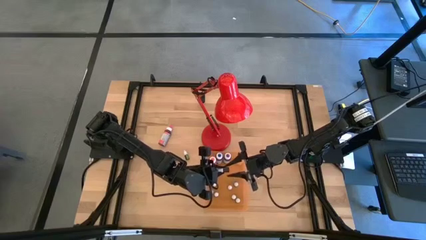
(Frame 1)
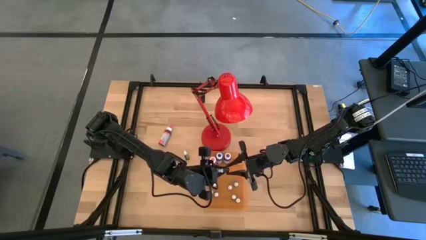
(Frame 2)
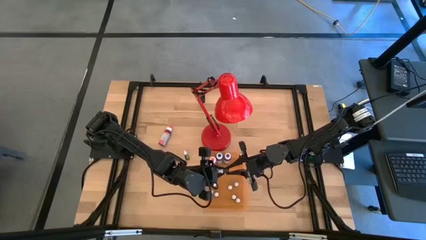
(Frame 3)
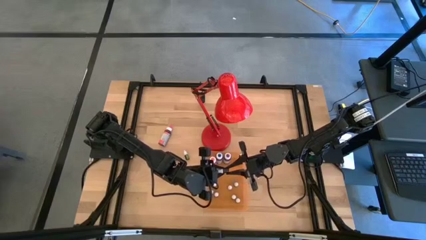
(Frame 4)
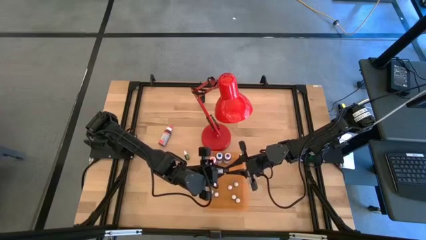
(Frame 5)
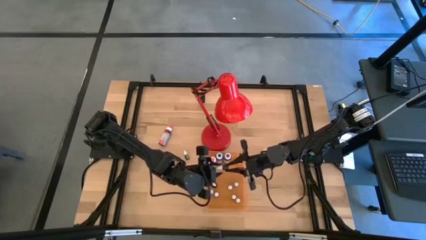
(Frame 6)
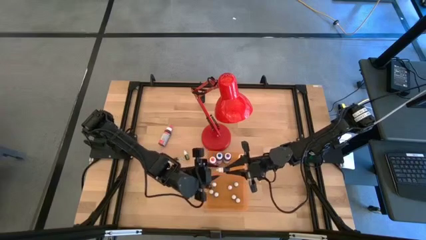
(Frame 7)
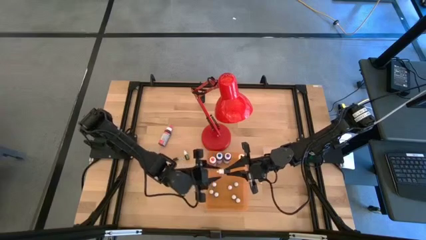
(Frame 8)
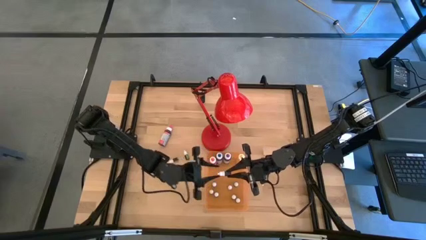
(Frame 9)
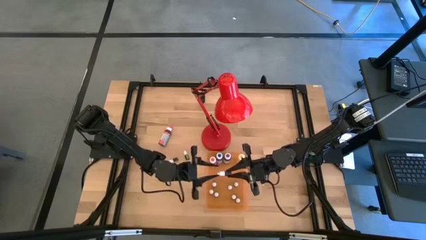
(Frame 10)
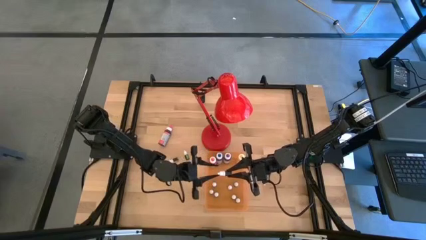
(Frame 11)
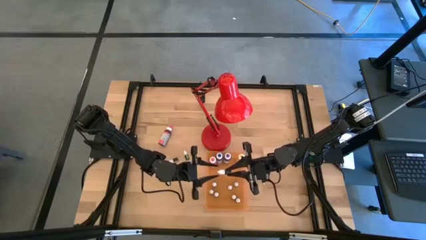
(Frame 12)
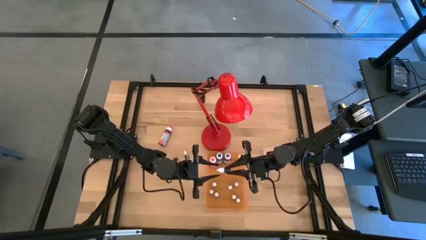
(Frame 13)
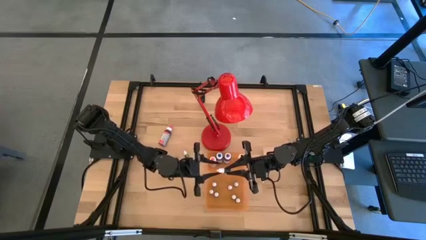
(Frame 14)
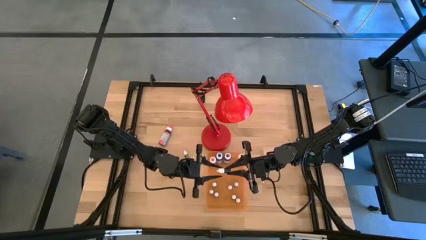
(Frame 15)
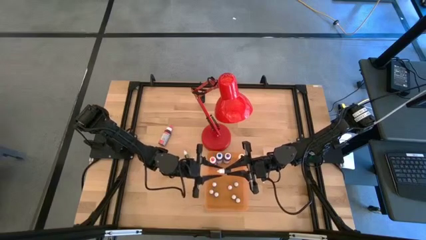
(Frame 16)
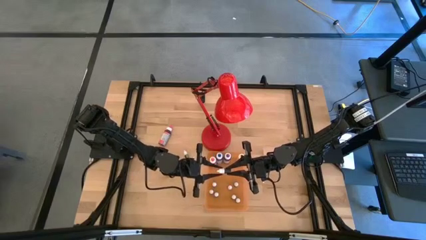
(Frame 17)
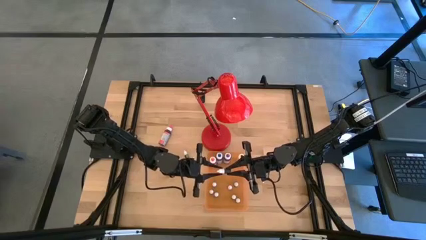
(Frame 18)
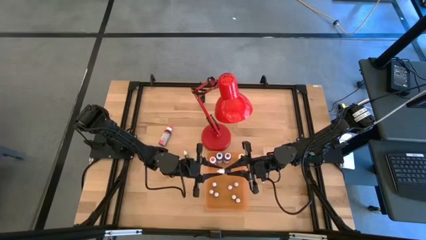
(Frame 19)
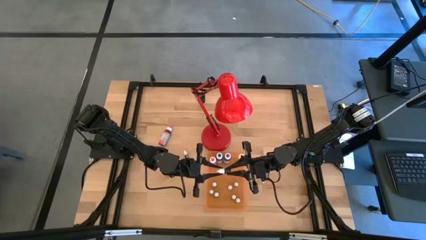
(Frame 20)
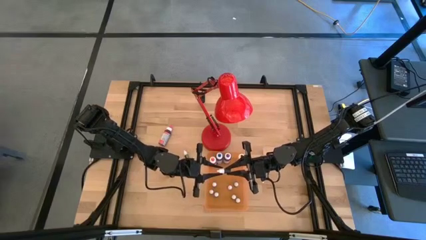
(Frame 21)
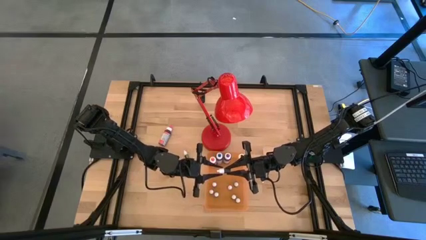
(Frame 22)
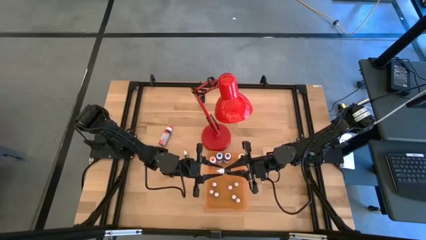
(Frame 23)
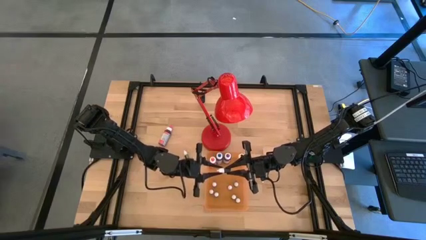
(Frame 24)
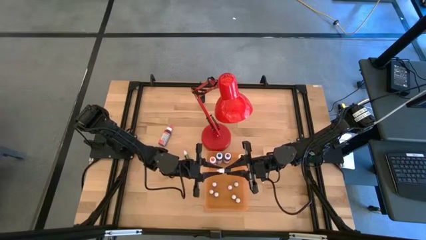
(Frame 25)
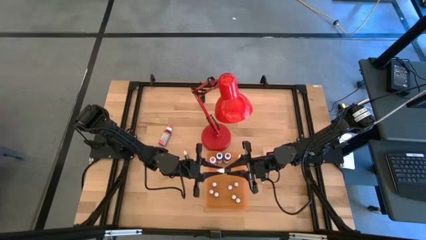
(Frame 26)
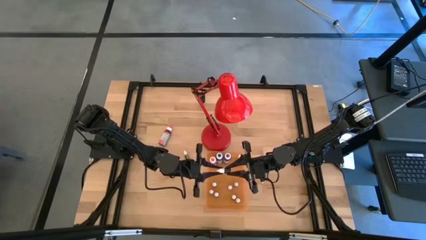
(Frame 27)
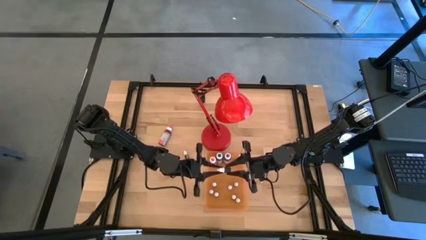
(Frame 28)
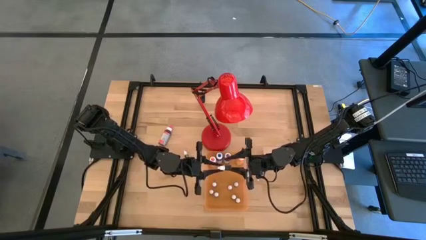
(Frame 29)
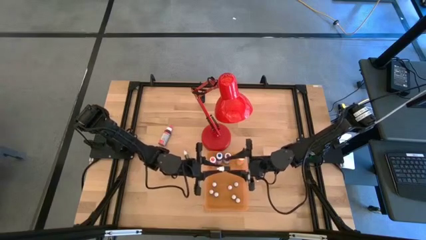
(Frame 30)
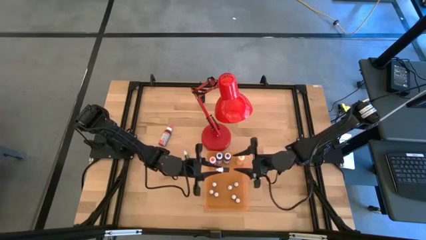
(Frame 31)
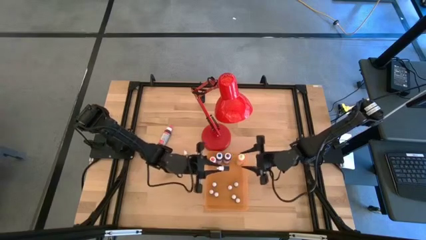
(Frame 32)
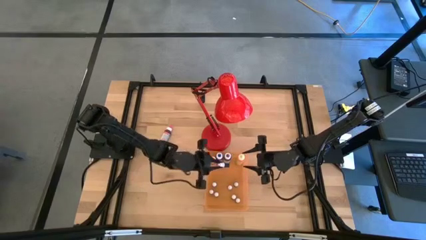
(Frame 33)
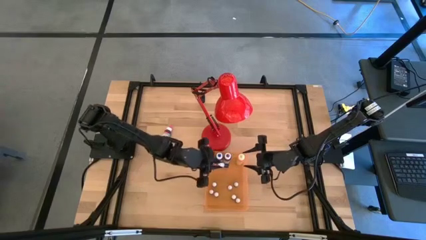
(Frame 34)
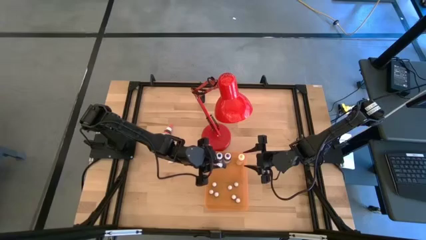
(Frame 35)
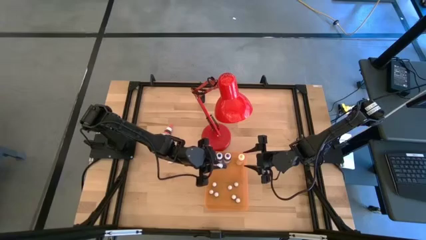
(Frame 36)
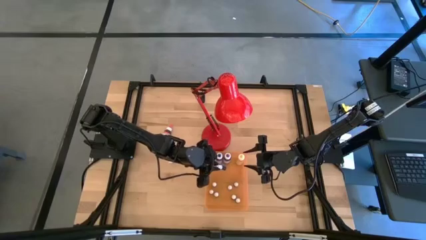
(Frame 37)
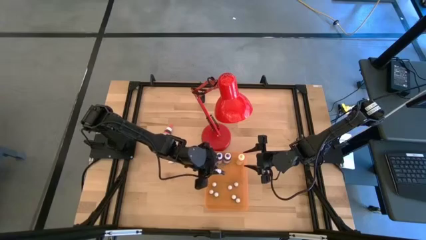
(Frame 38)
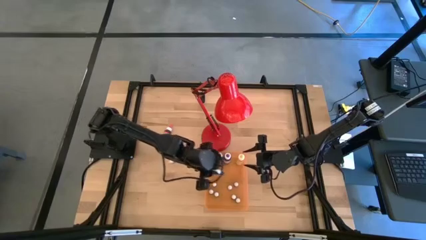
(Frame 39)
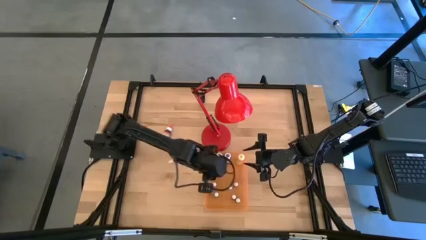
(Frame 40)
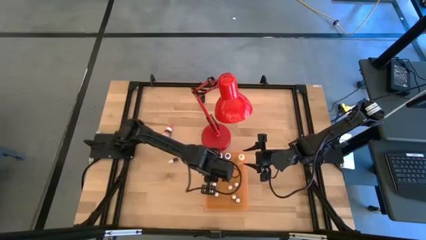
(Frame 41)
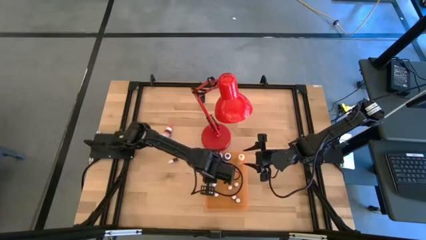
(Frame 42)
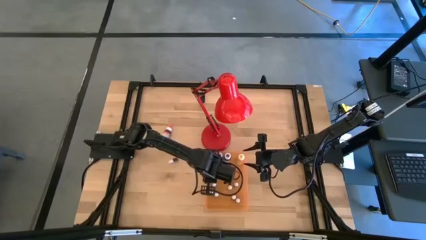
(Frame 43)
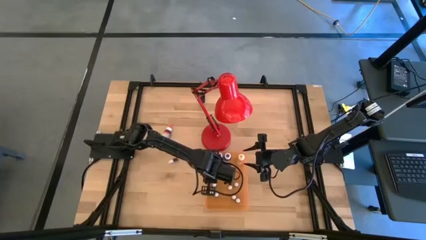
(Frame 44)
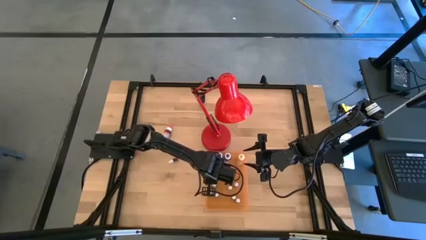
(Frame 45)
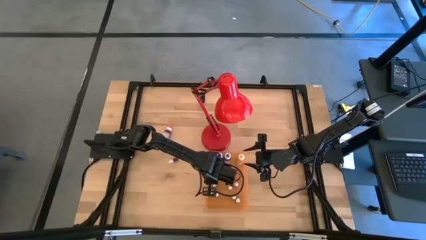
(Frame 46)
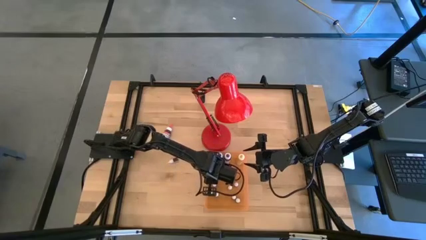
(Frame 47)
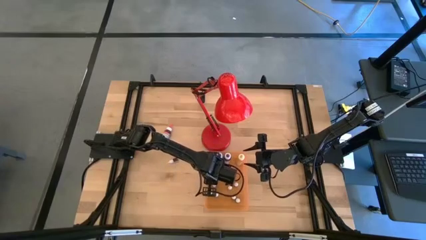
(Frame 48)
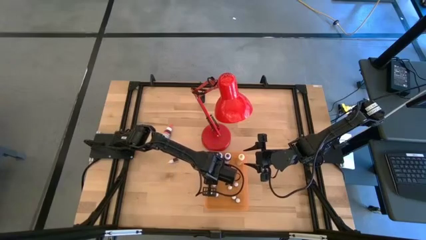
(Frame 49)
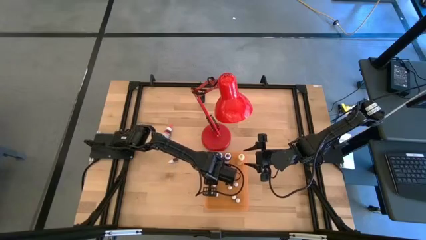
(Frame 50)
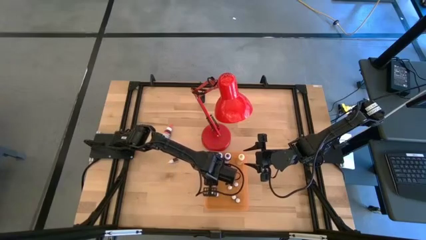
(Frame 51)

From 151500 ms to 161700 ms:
Task: Pick & Place food coloring
Put the small black food coloring bottle into the orange bin

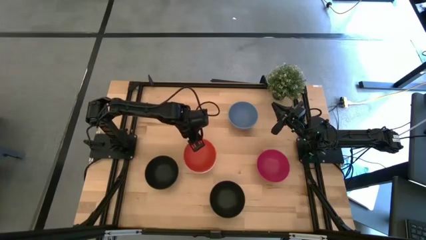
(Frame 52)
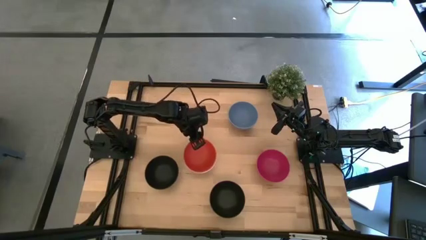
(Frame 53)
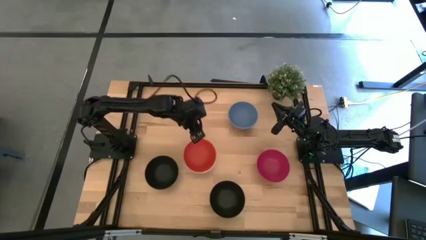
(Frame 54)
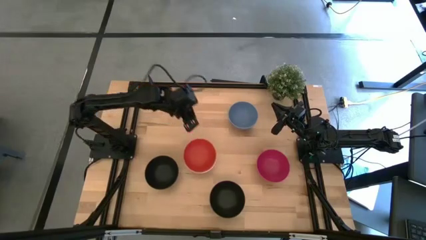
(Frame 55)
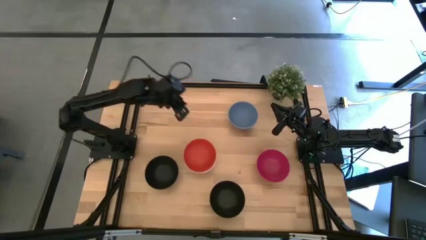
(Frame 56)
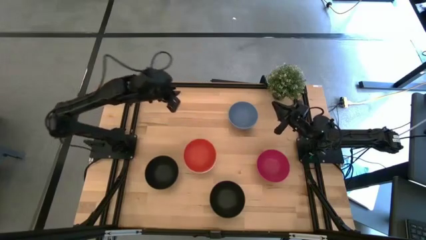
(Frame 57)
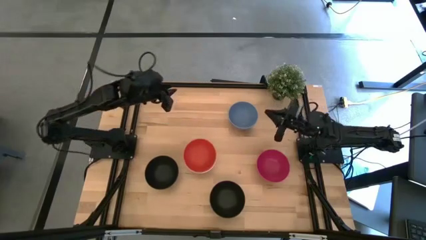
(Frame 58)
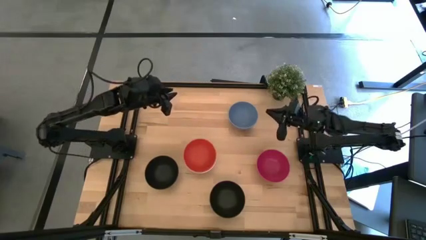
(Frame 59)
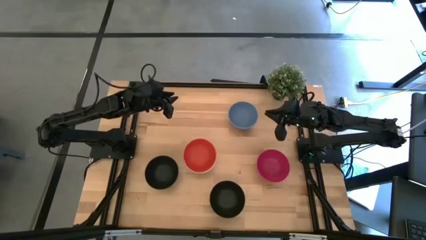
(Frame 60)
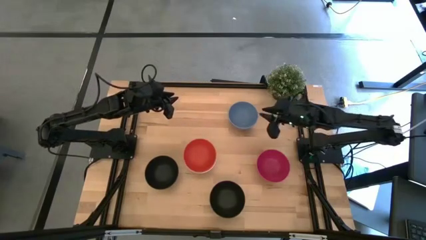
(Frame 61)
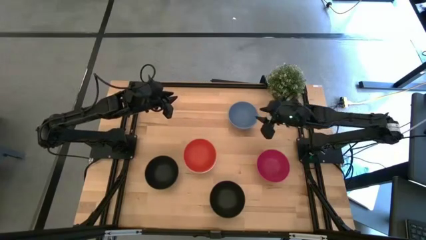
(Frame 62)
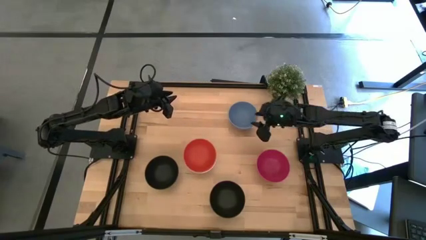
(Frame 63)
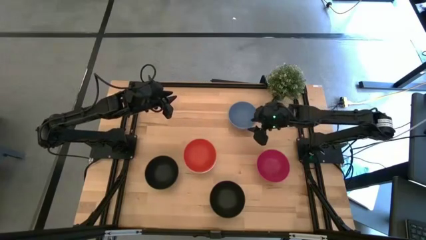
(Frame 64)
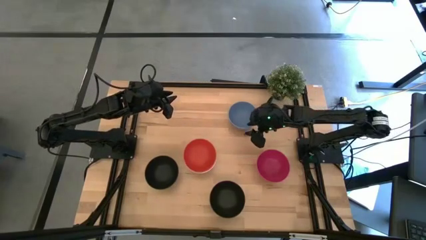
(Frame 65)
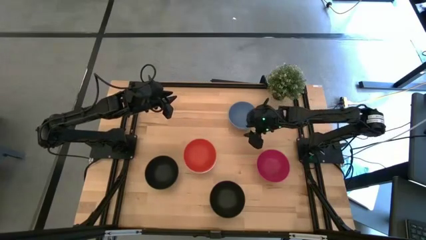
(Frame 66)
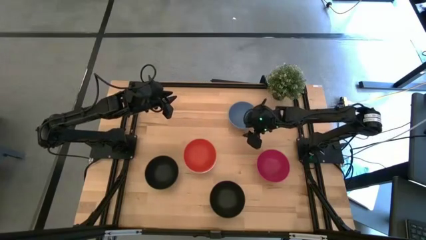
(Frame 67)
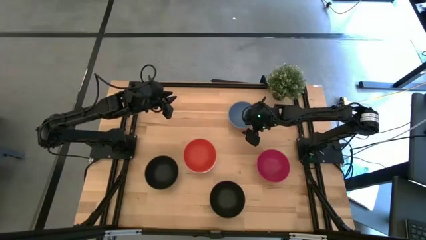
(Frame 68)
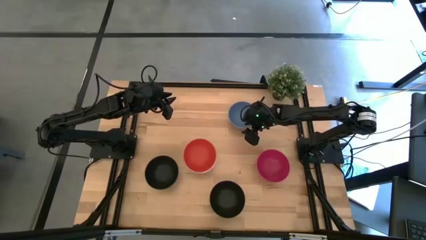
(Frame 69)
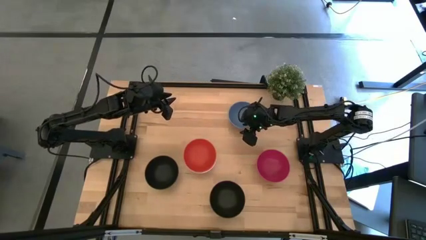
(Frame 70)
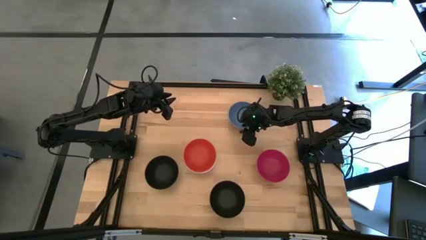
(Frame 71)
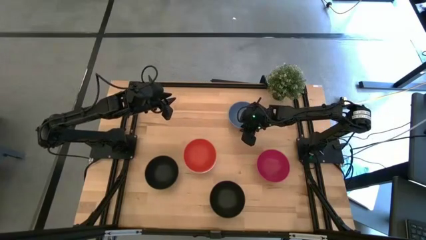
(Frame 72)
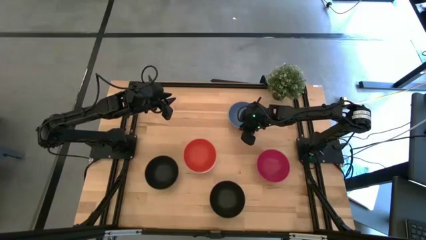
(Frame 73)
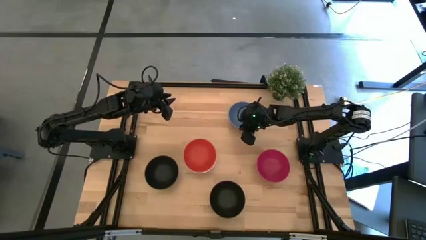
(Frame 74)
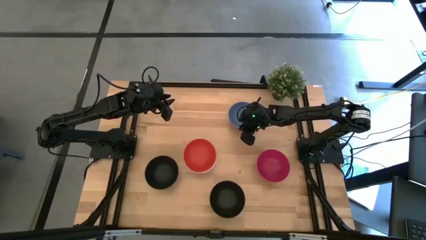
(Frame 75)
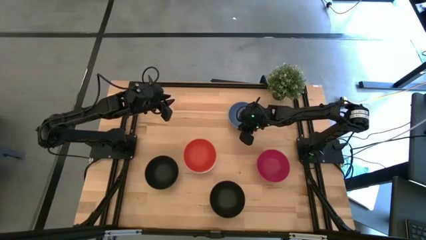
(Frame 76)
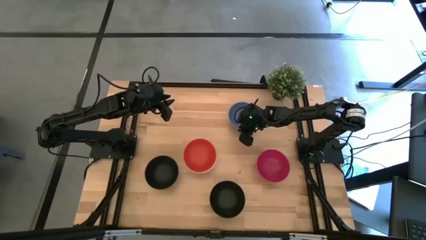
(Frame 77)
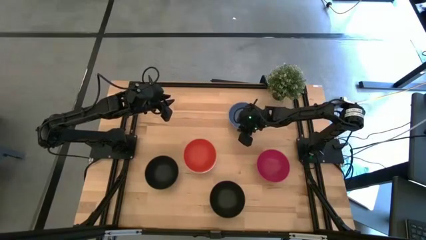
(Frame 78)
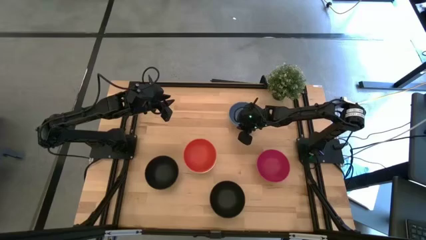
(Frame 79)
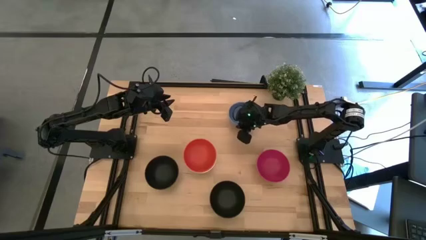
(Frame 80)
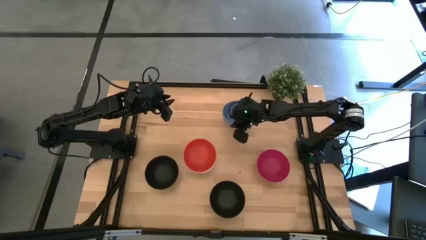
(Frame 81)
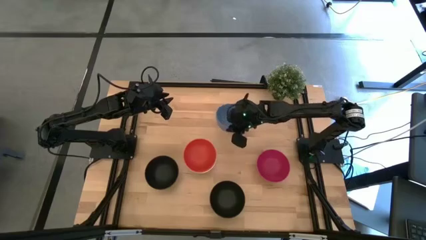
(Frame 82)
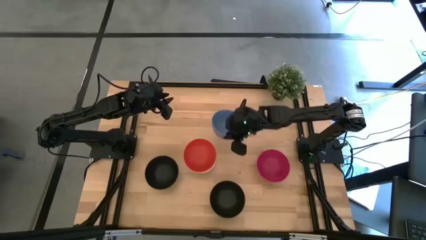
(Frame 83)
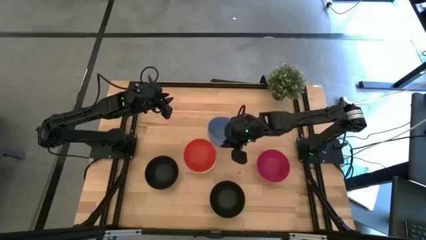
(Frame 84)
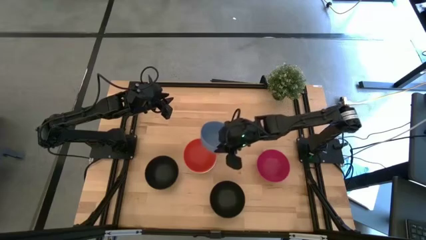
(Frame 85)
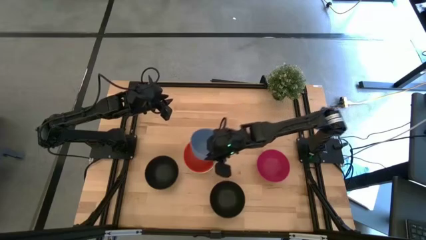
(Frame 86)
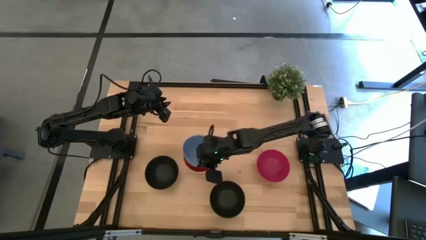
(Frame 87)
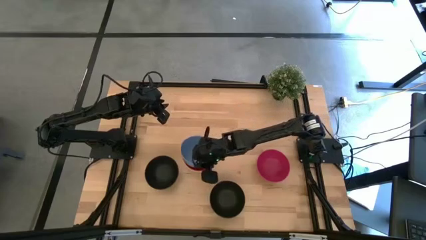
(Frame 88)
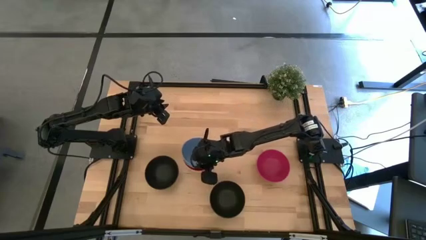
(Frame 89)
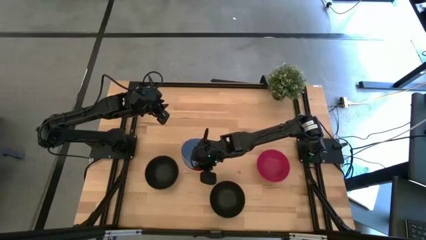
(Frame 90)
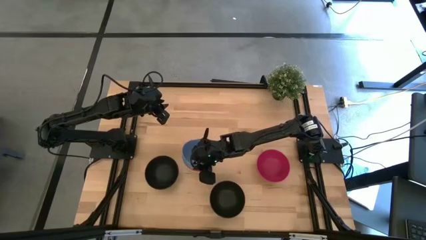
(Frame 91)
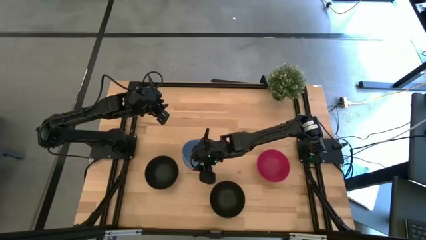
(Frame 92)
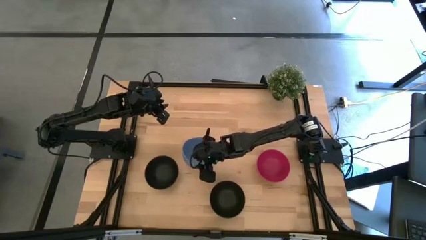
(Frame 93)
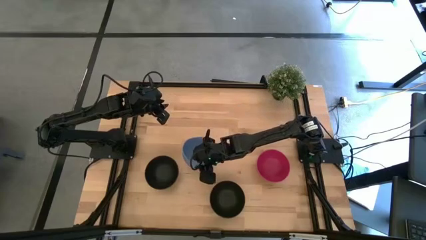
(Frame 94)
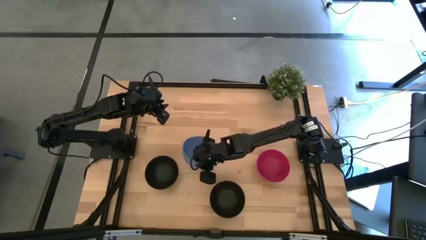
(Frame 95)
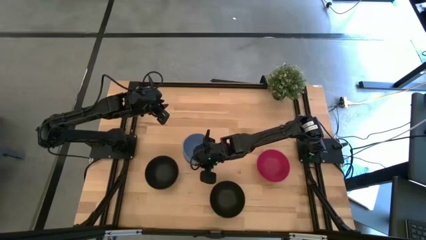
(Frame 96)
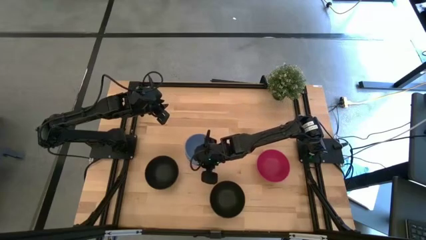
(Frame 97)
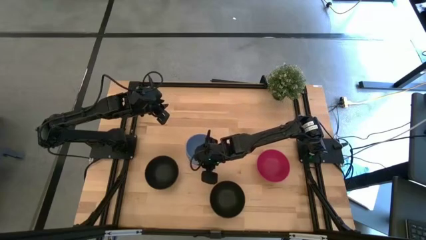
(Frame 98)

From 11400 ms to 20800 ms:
Task: Nest bowls inside each other
Stack the blue bowl on top of the orange bowl
